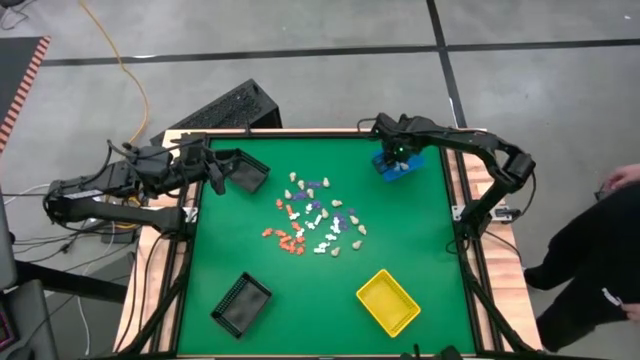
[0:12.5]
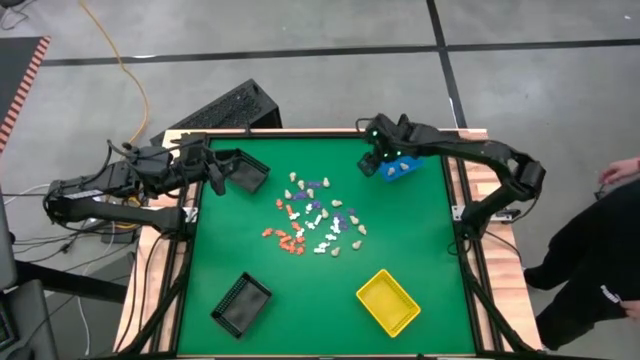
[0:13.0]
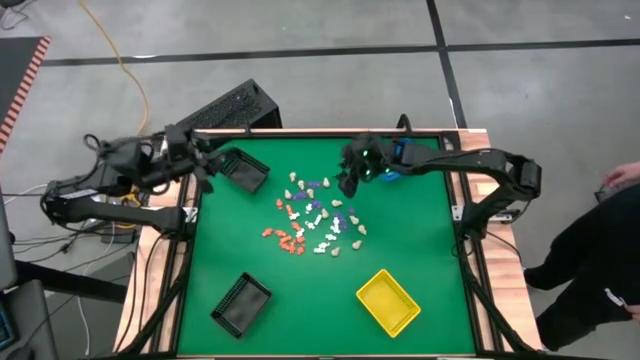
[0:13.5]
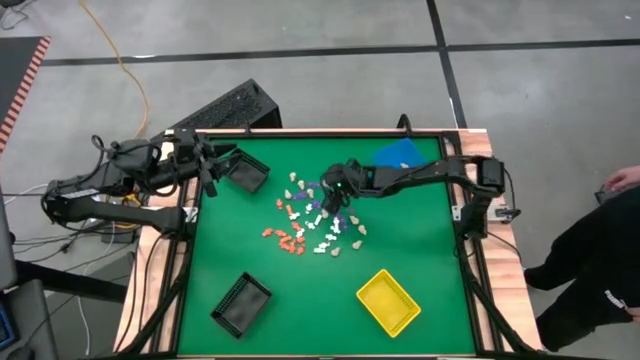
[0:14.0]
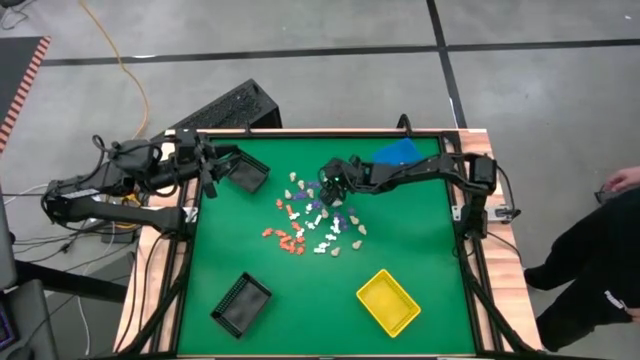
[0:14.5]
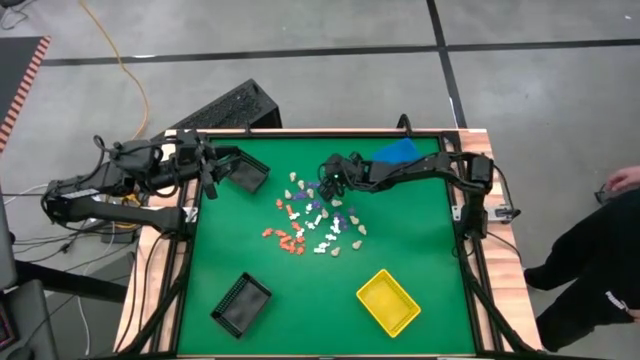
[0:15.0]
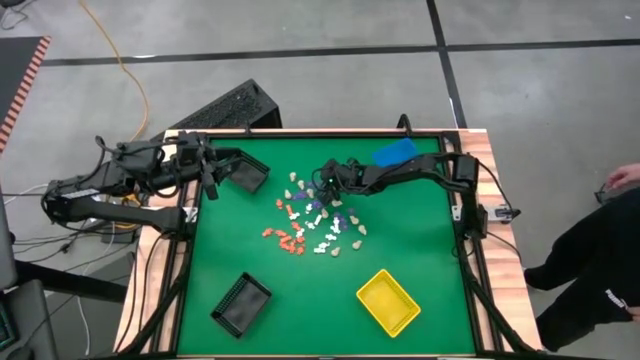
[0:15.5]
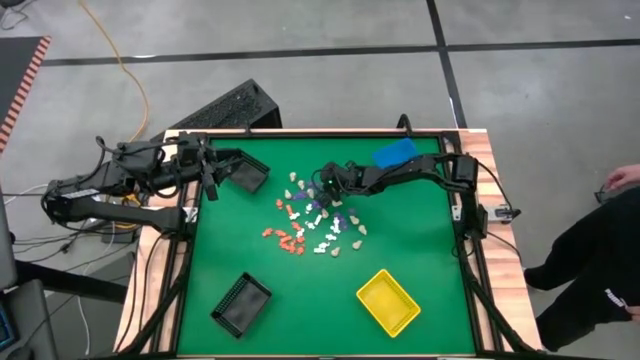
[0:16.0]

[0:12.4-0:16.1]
Task: Sort Halloween decoration
Put the skull toy into the blue basket

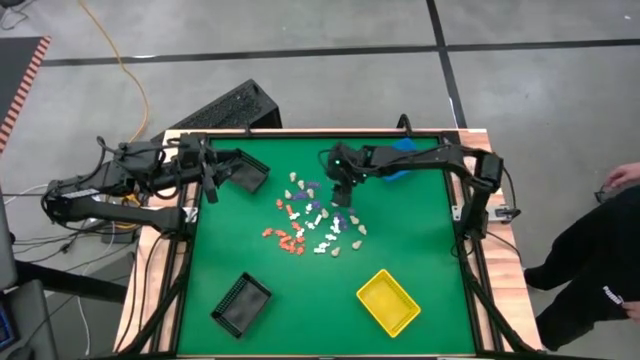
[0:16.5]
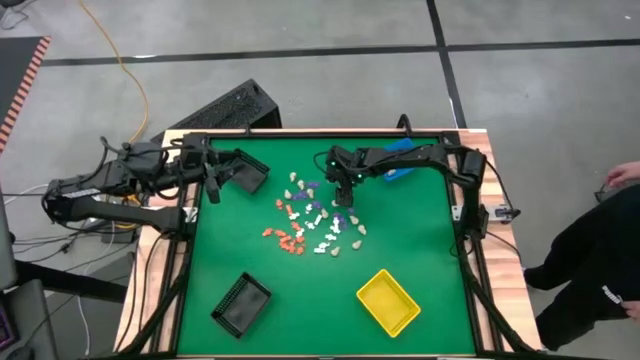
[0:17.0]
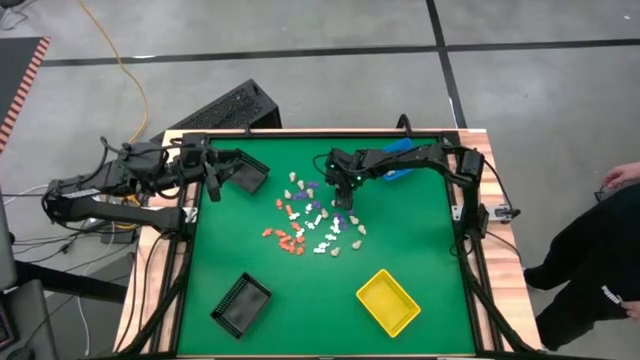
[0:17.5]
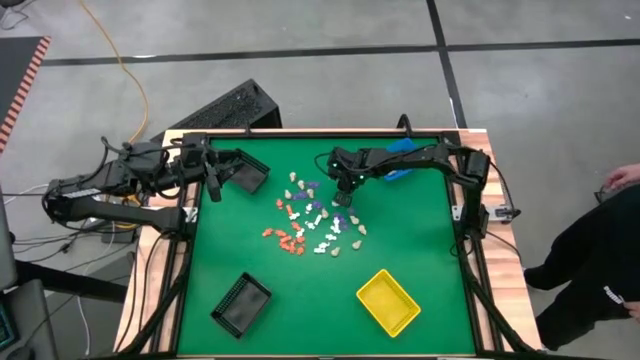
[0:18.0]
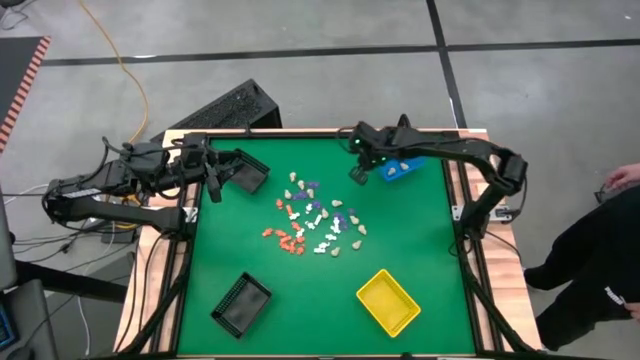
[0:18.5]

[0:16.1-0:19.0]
Put the skull toy into the blue basket

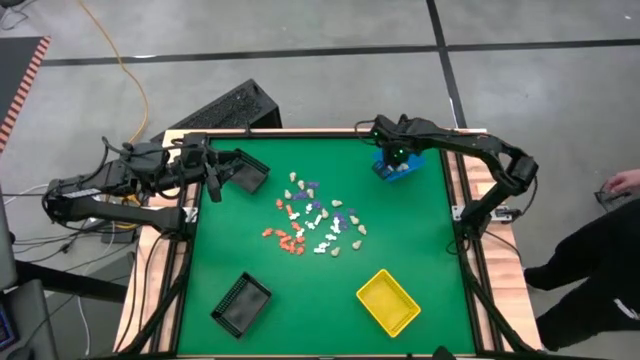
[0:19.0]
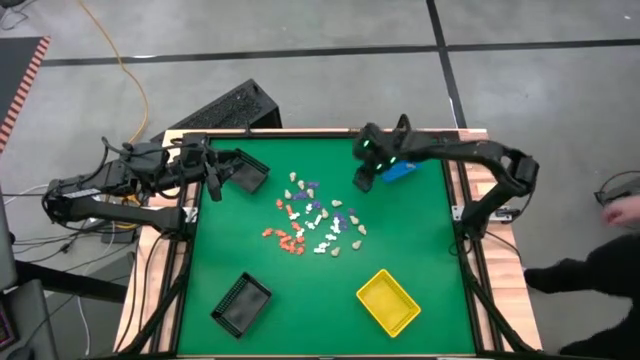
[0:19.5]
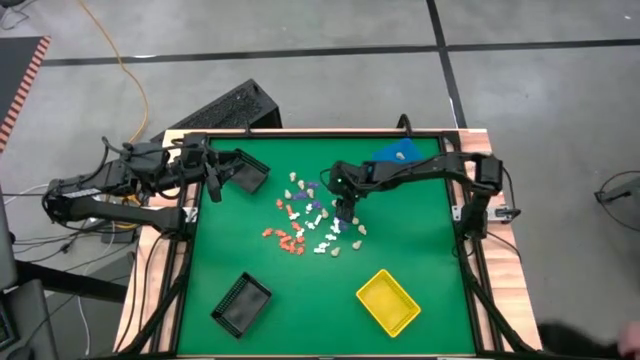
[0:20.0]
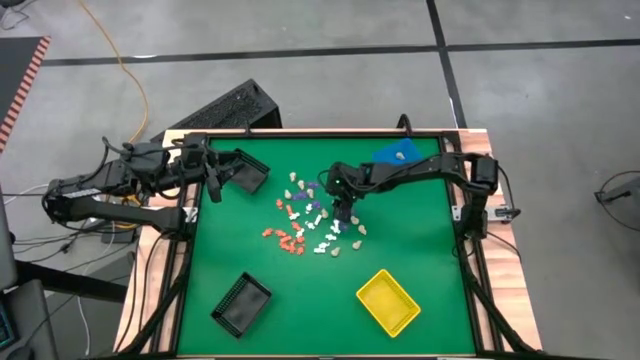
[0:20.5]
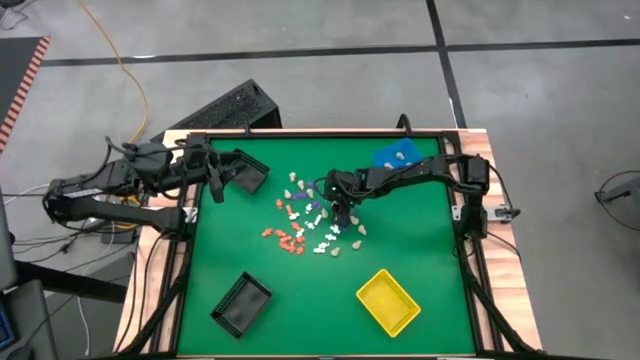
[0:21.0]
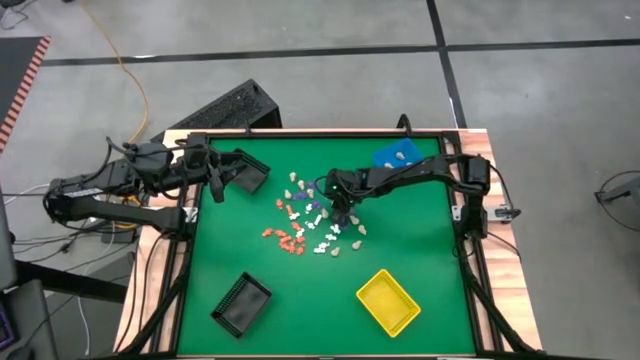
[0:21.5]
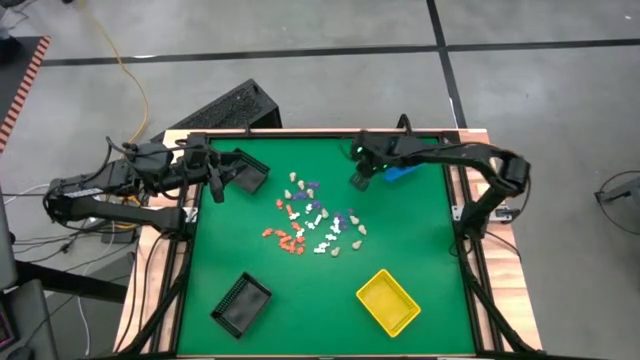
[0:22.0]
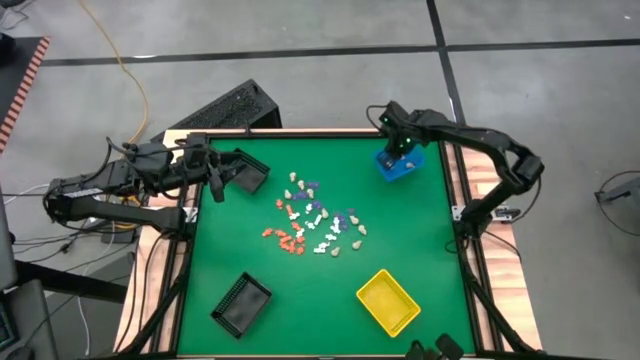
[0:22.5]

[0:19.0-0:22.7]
Put the skull toy into the blue basket

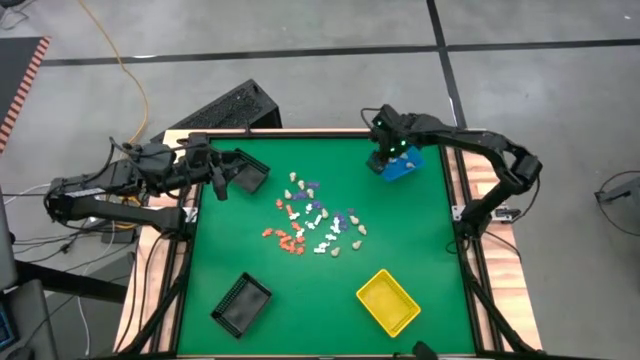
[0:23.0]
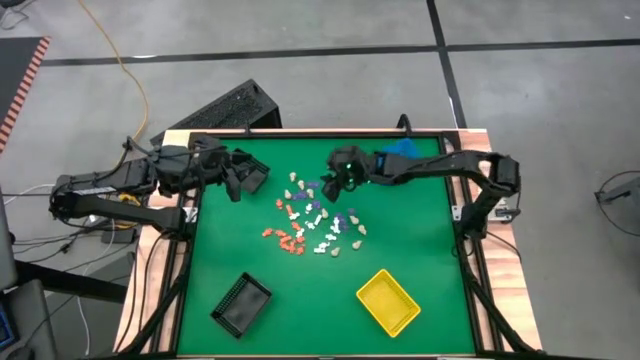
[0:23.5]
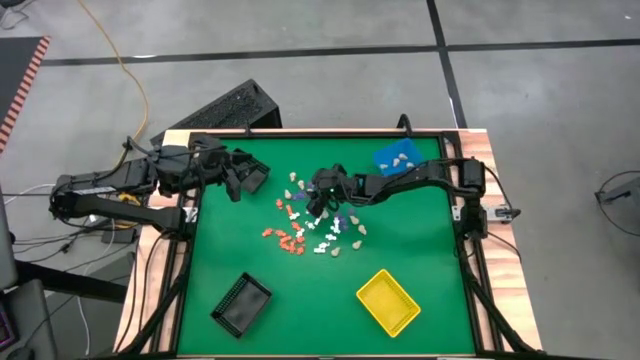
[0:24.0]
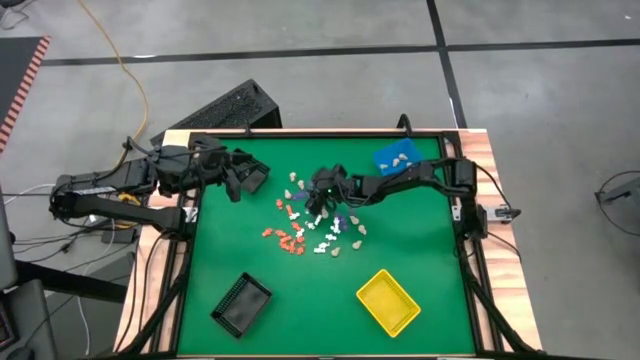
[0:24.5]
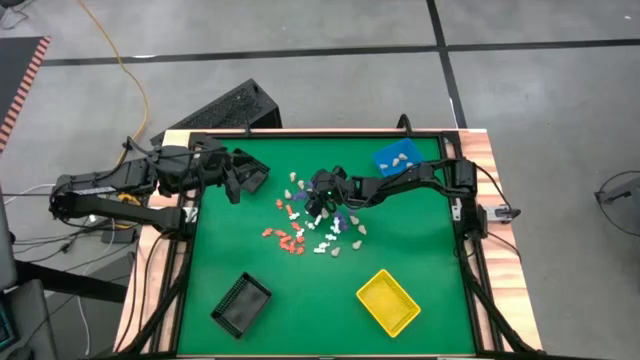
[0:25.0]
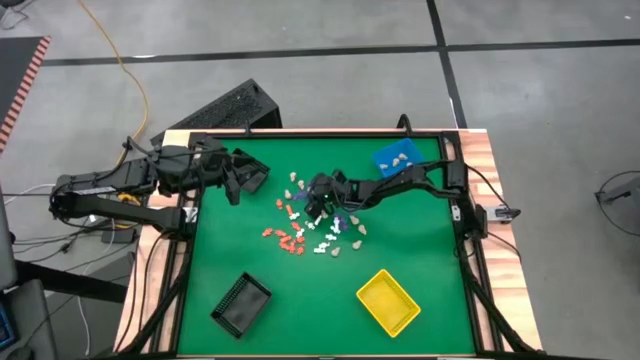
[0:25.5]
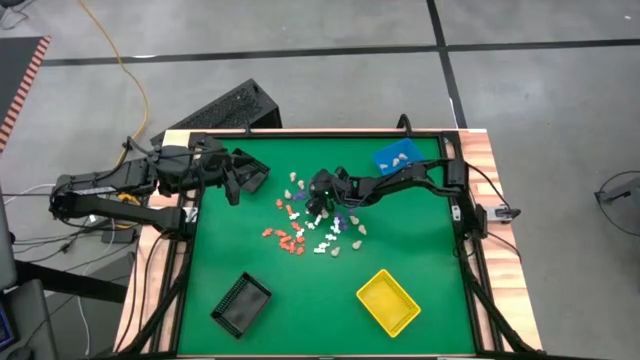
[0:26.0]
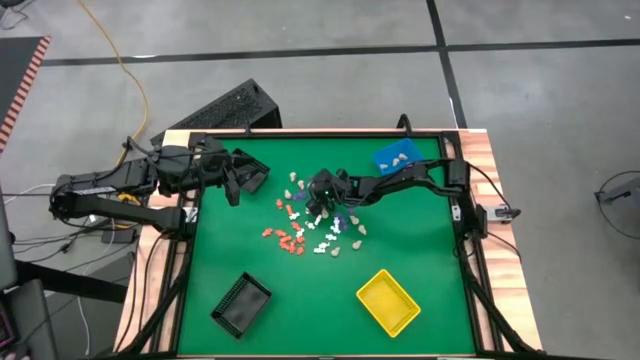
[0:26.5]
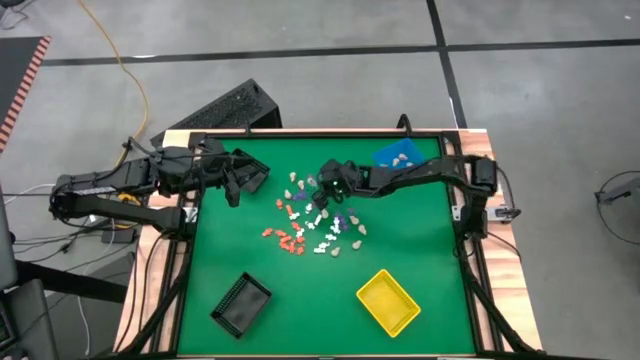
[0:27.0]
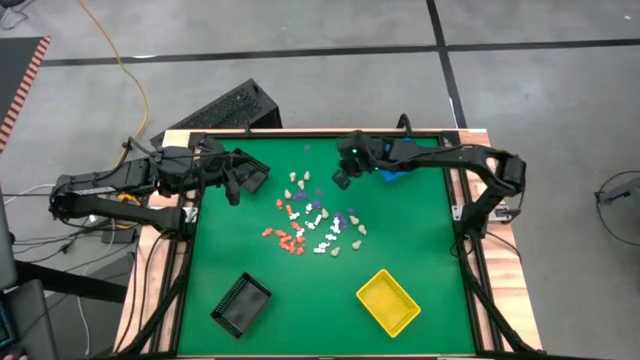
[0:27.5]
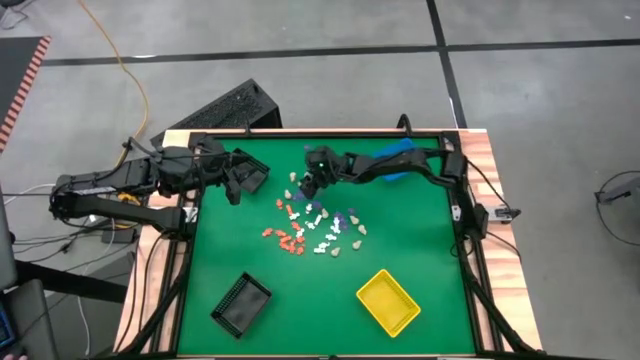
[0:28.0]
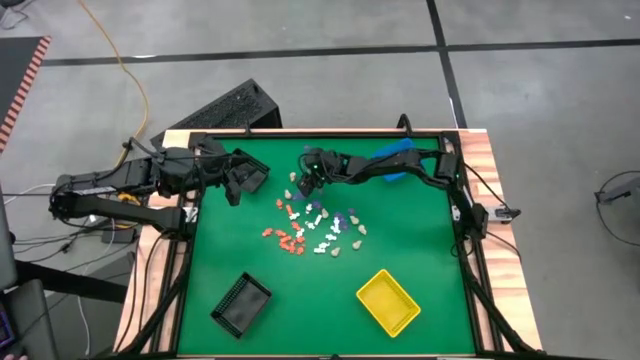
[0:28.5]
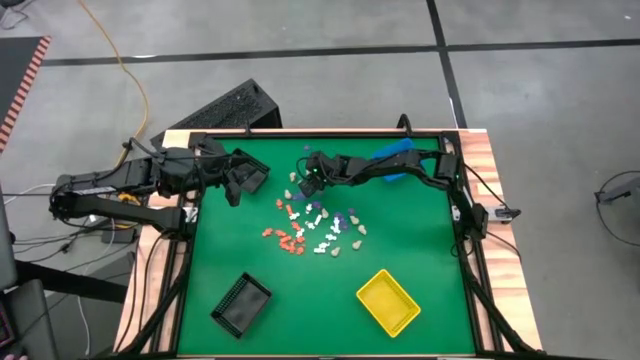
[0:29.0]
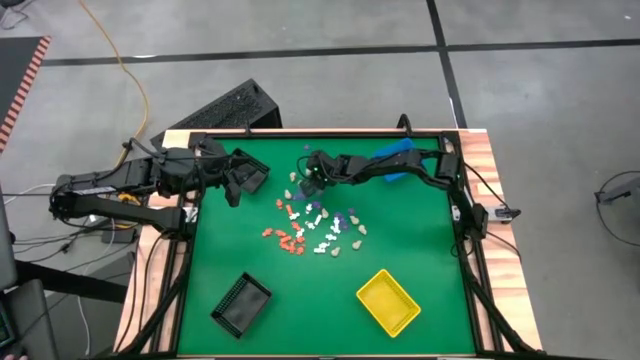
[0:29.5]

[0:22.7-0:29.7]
Put the skull toy into the blue basket

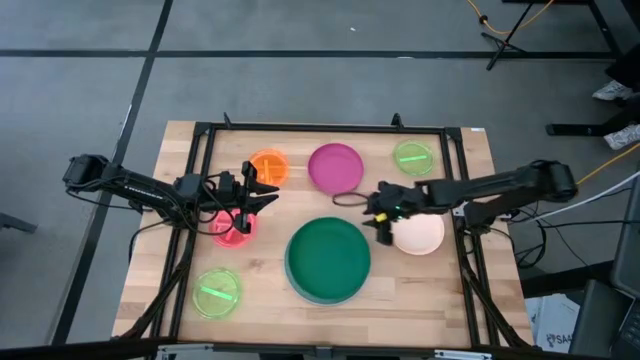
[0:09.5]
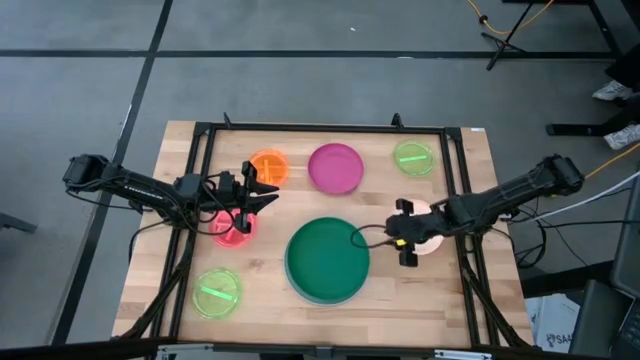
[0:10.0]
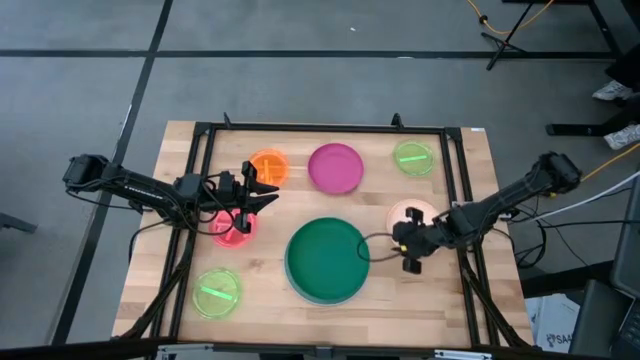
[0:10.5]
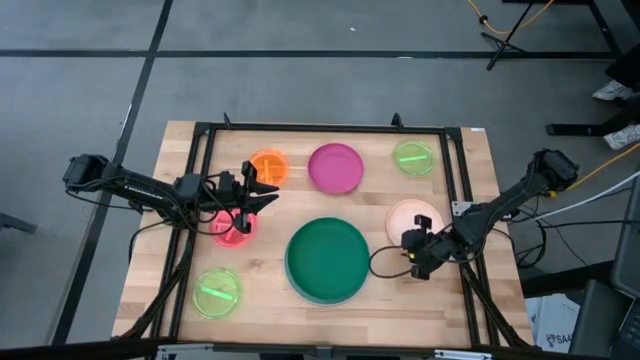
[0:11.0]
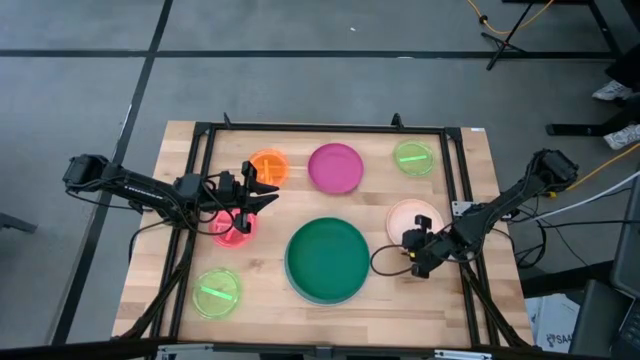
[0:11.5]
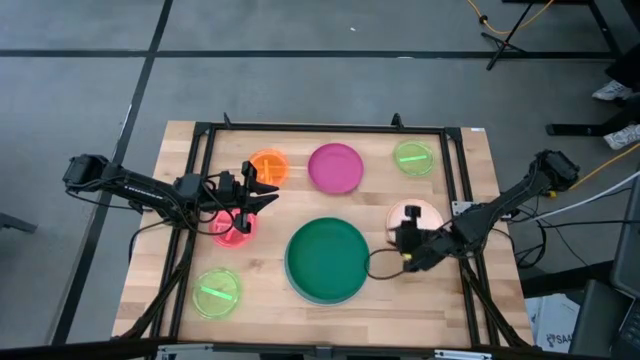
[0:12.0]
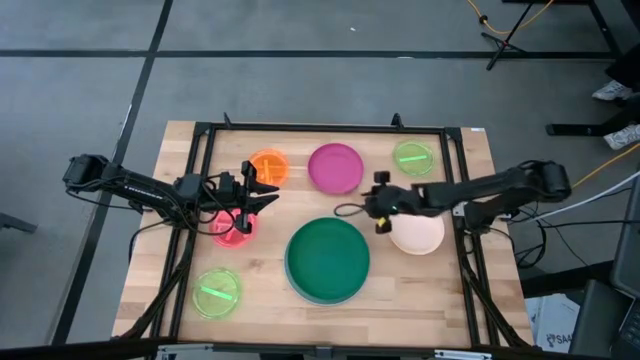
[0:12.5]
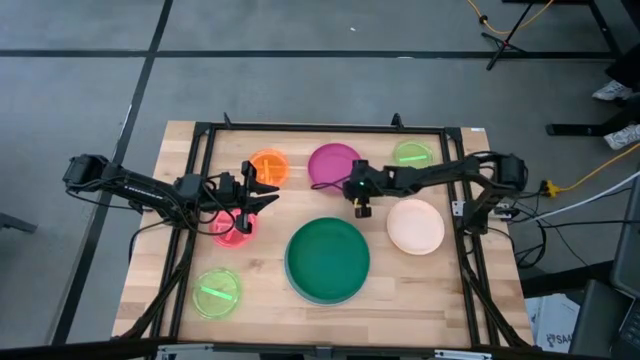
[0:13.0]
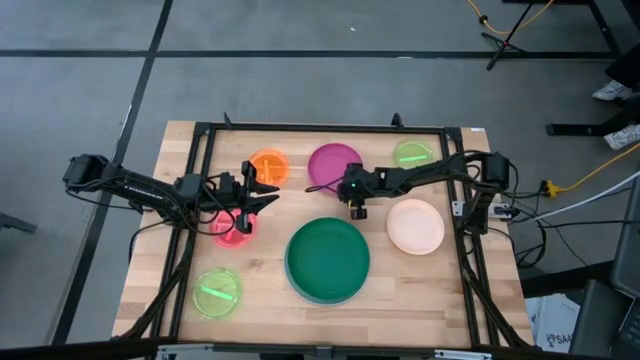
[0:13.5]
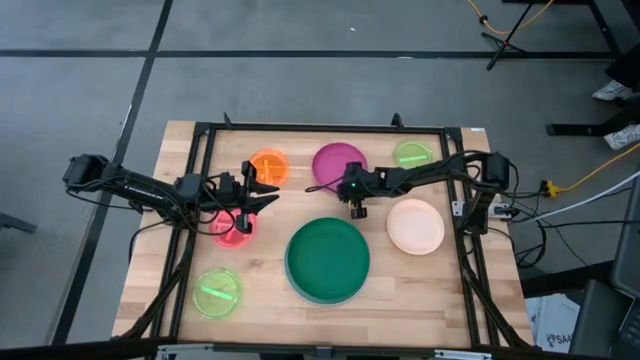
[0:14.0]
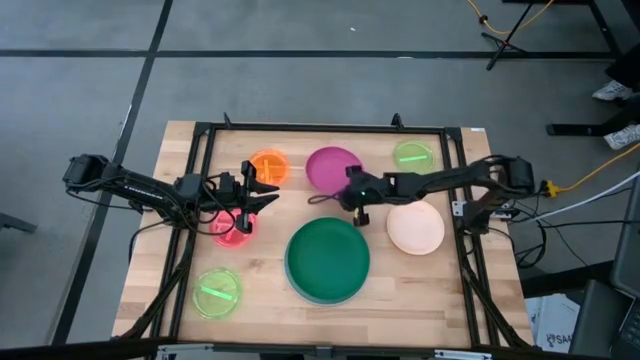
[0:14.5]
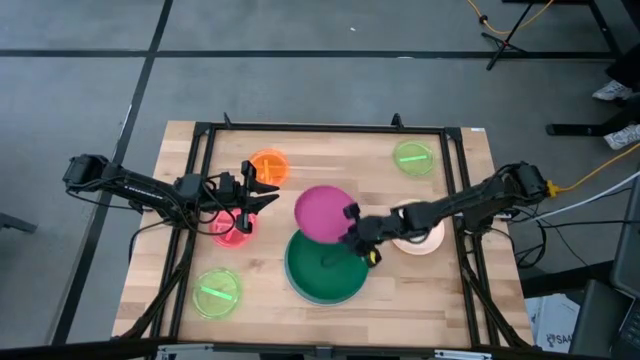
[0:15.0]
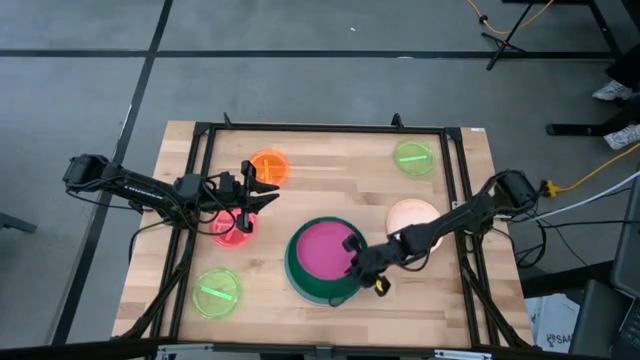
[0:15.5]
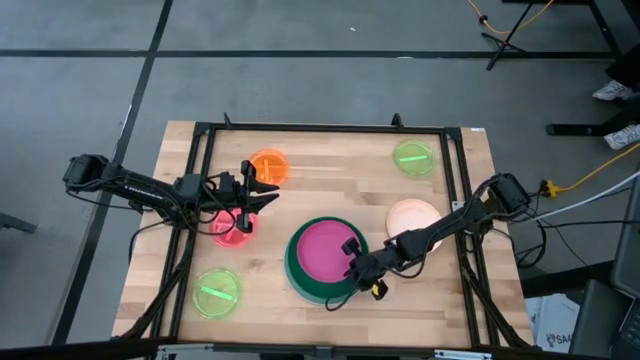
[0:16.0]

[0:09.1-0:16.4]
Task: Stack plastic plates
Stack the pink plate on top of the green plate
